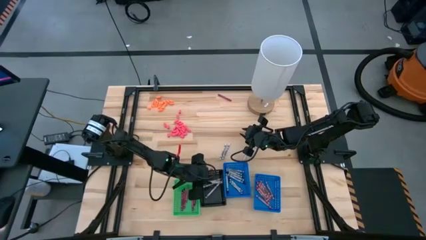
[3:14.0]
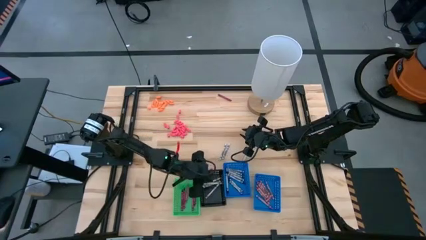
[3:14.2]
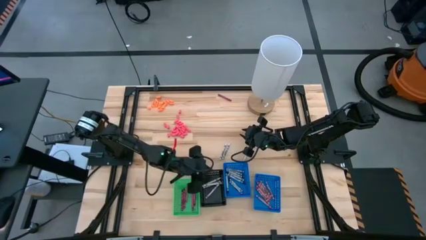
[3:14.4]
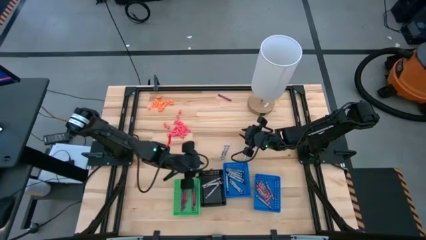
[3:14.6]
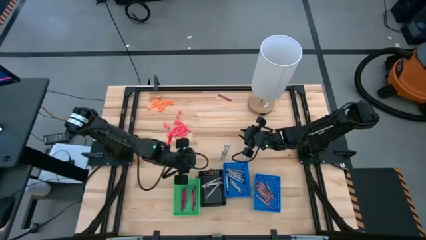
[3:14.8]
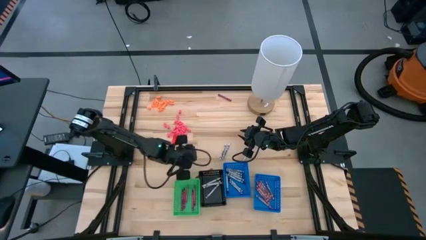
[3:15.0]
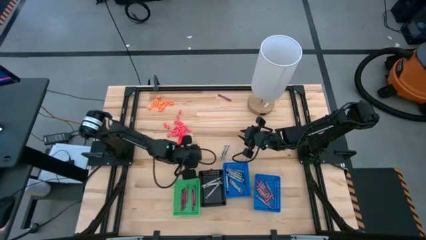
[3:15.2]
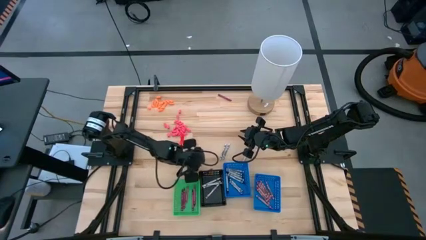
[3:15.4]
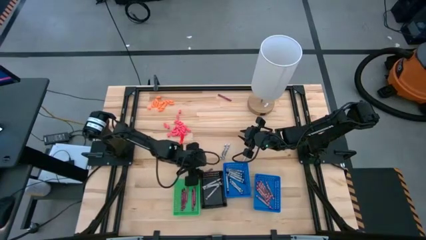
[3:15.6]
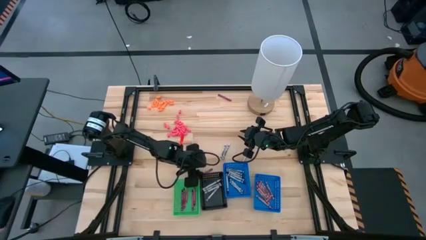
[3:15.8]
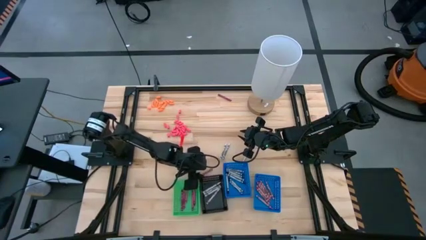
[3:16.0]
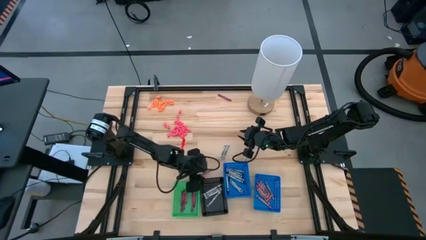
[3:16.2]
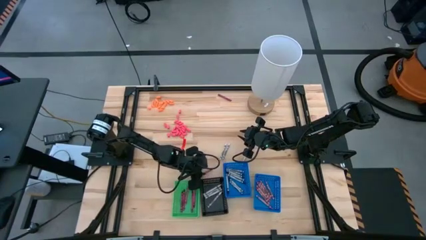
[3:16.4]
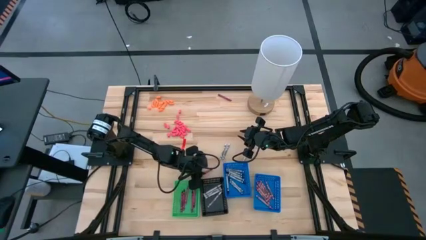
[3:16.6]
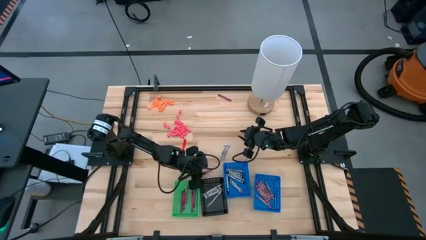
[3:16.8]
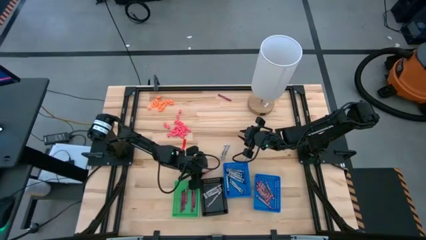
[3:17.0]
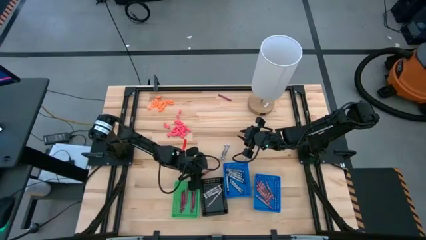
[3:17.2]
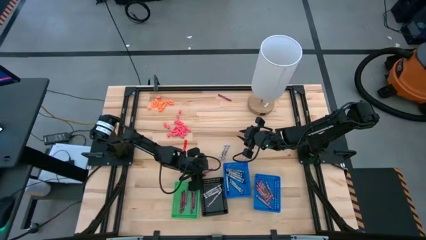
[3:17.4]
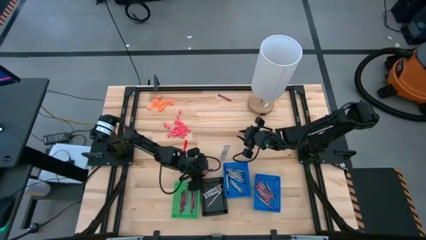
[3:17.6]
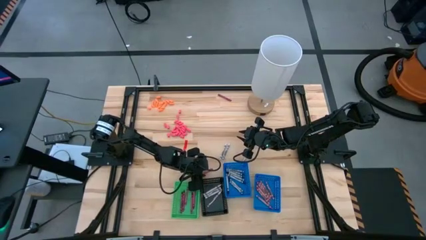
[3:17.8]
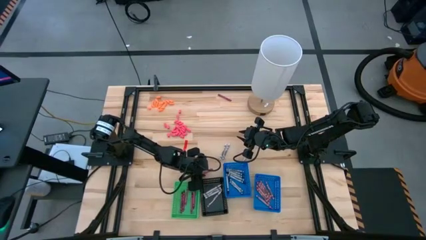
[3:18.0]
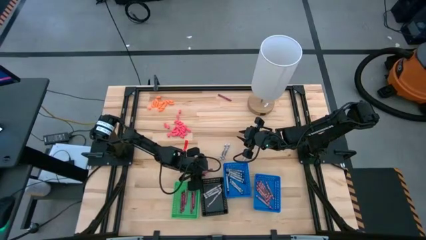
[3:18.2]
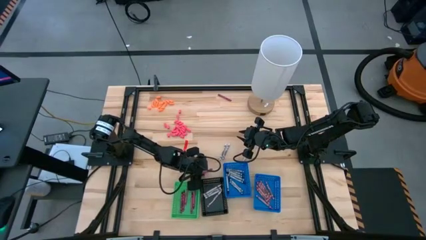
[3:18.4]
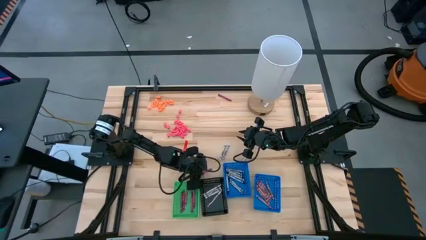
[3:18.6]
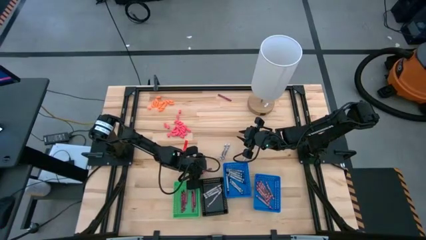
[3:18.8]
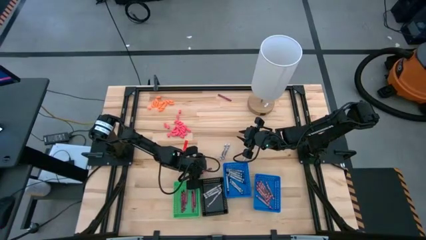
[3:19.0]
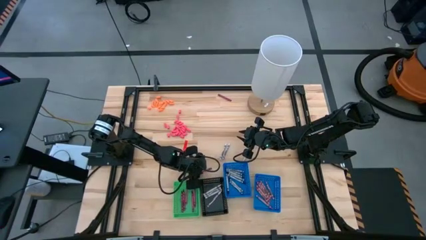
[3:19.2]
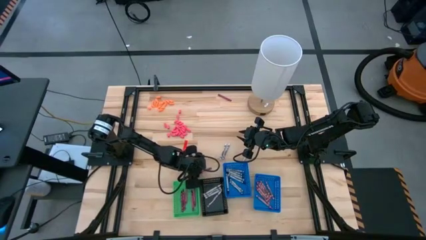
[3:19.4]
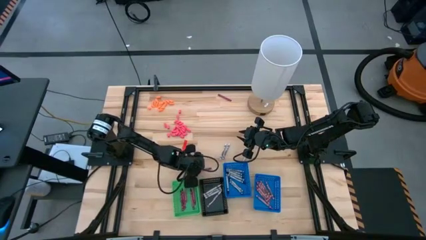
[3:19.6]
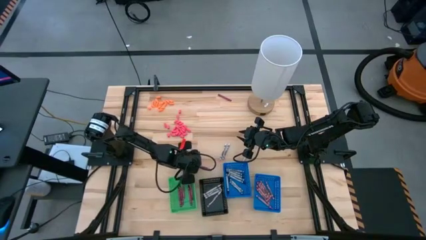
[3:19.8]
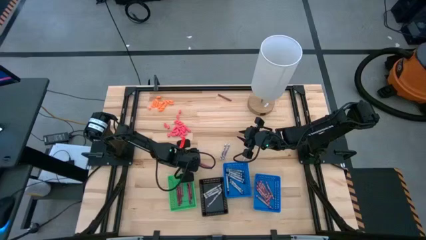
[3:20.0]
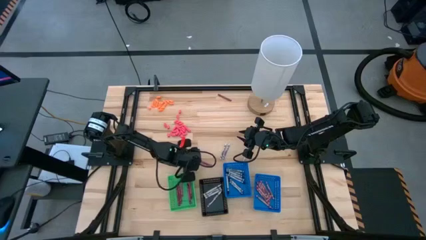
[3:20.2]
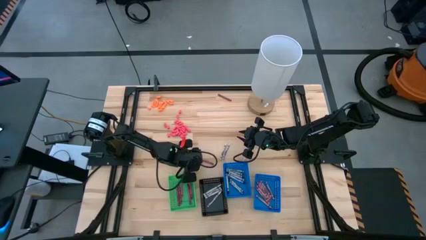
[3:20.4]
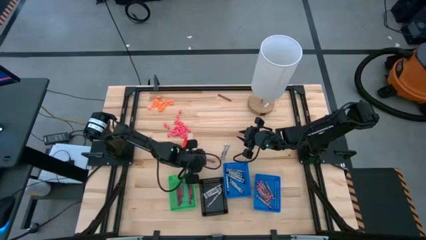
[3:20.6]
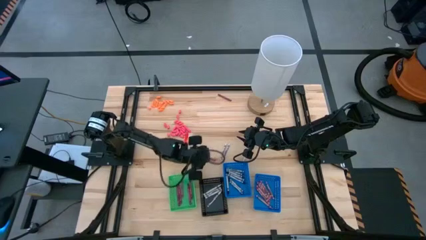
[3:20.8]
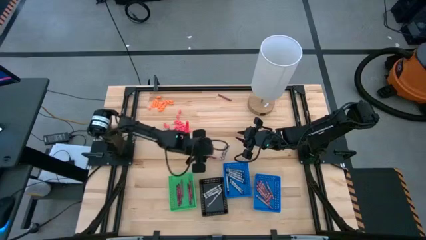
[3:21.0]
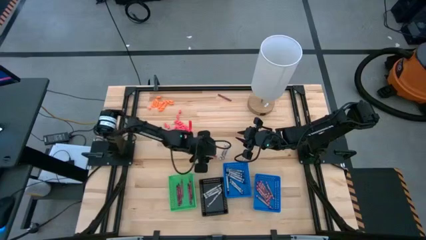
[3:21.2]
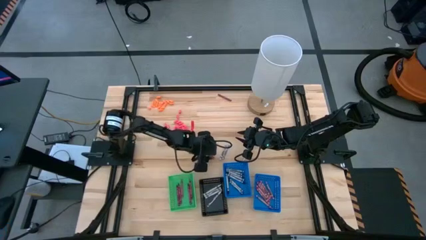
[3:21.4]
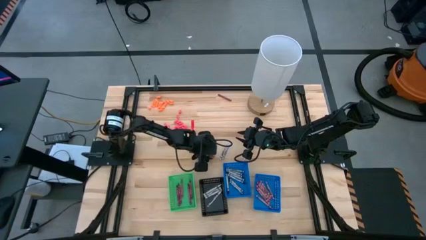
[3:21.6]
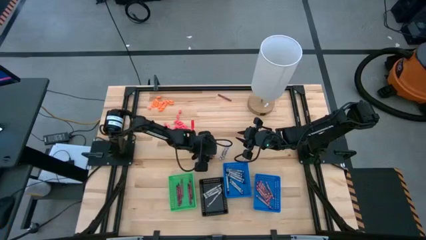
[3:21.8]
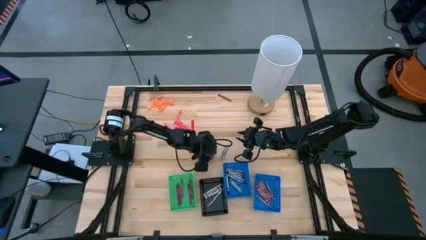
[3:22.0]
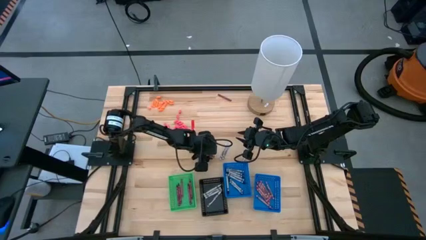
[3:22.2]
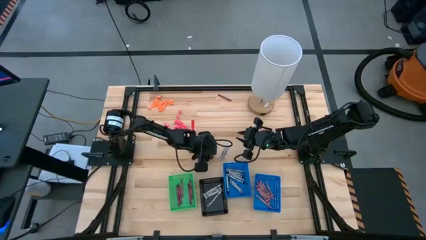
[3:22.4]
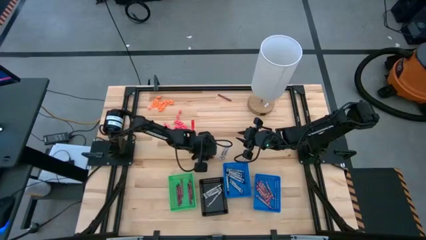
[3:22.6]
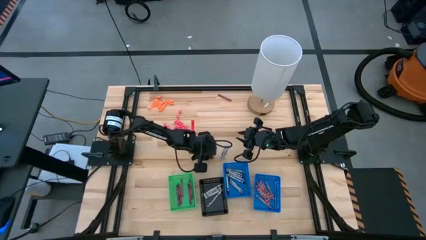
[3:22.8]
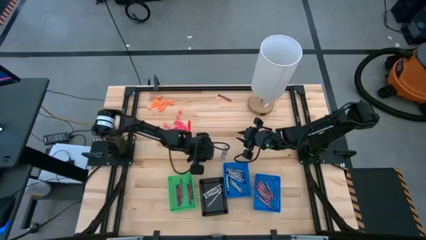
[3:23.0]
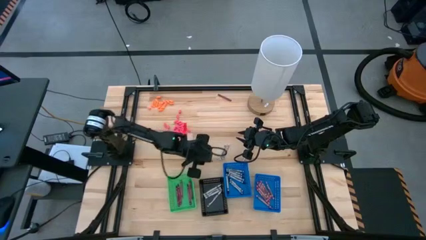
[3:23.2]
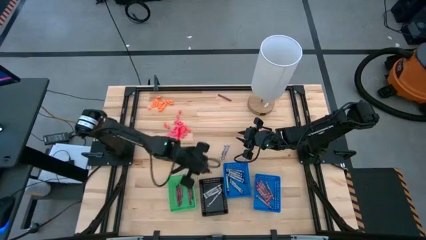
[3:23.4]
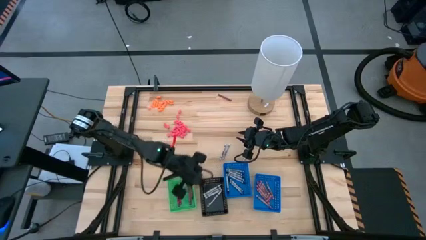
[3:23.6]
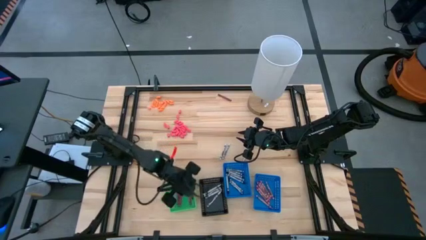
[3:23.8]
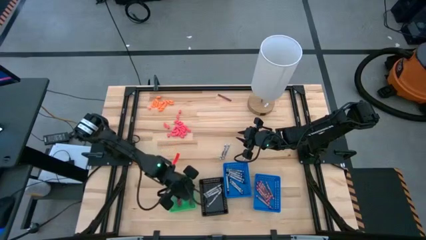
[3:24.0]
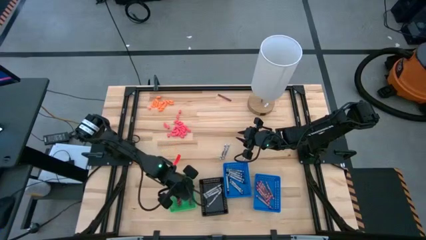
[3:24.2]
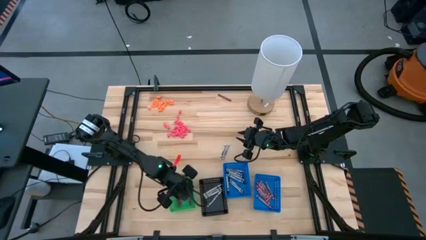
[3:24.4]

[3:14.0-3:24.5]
Task: Sort crayons
Put the red crayon into the green bin
